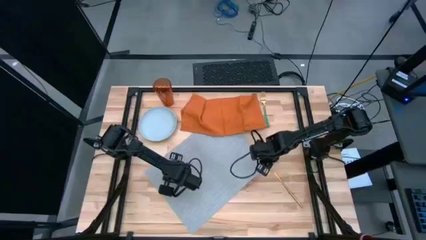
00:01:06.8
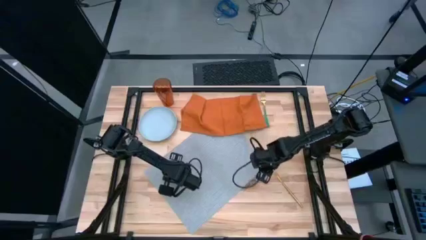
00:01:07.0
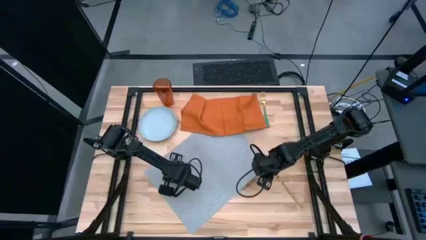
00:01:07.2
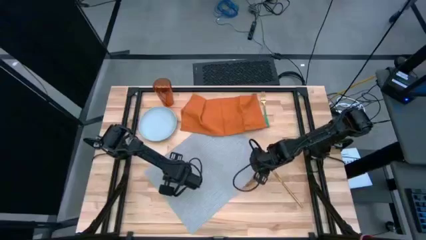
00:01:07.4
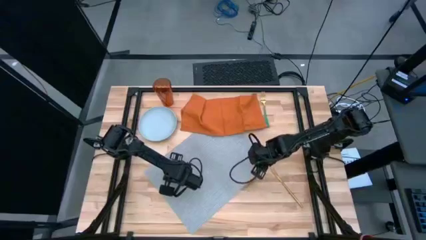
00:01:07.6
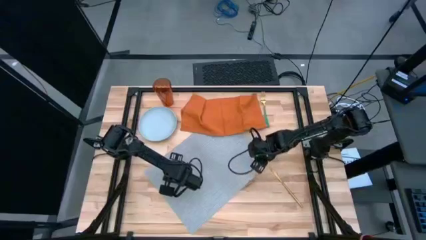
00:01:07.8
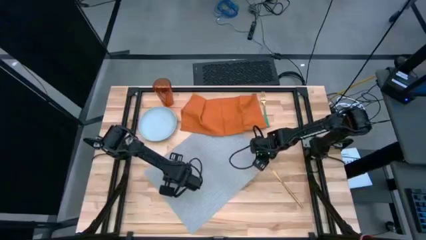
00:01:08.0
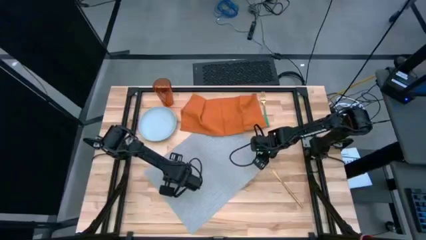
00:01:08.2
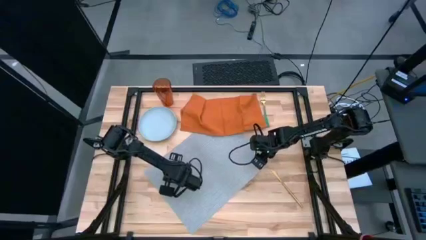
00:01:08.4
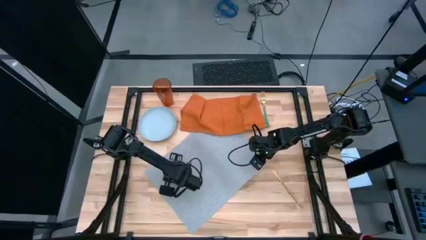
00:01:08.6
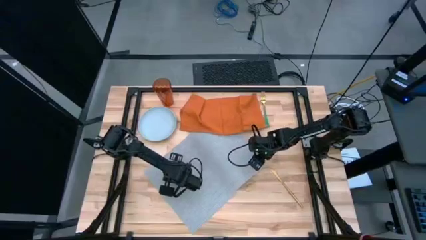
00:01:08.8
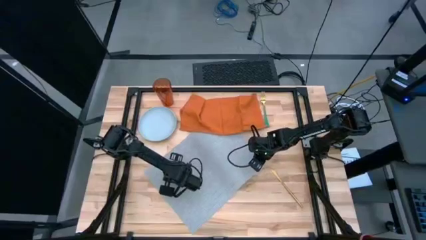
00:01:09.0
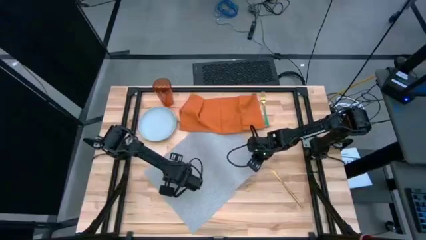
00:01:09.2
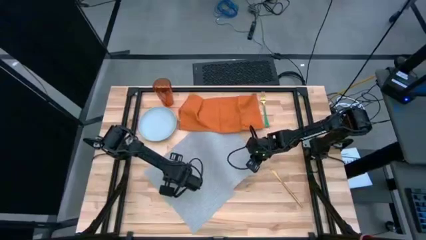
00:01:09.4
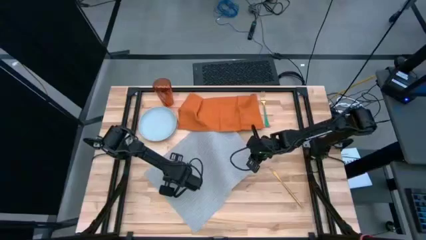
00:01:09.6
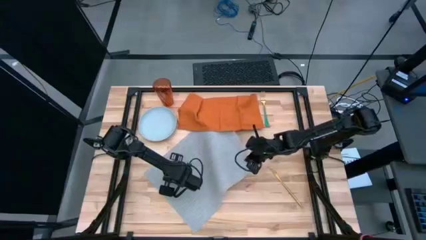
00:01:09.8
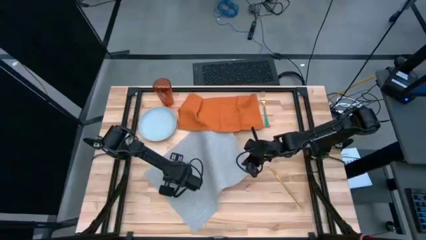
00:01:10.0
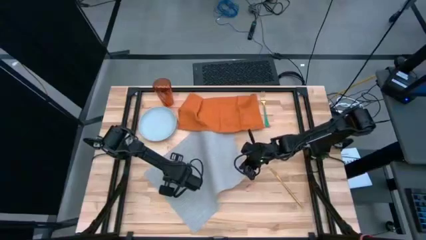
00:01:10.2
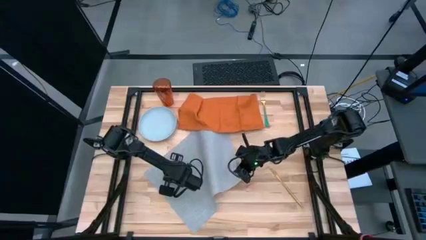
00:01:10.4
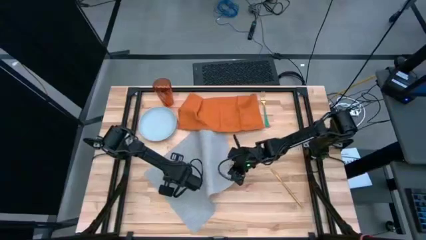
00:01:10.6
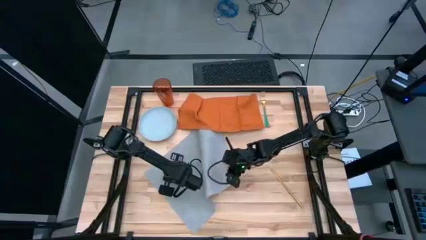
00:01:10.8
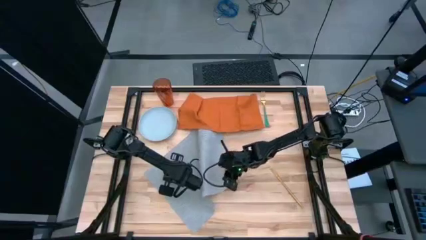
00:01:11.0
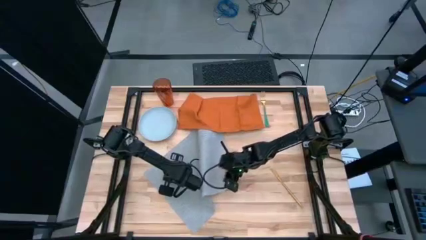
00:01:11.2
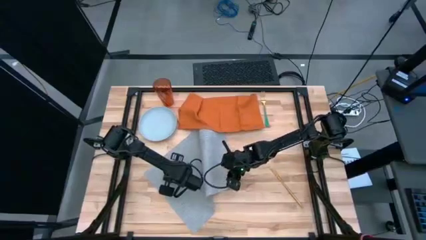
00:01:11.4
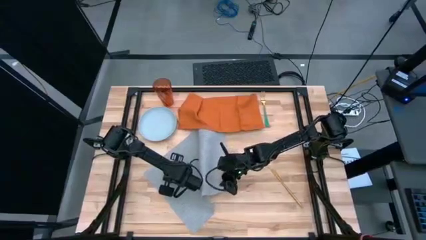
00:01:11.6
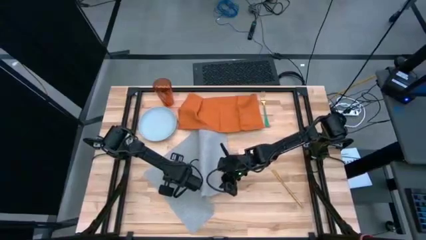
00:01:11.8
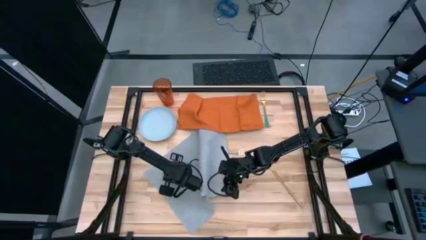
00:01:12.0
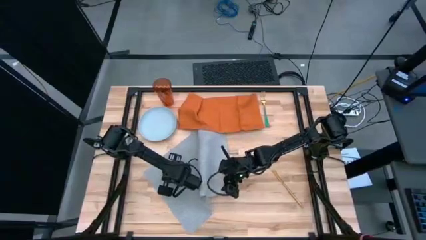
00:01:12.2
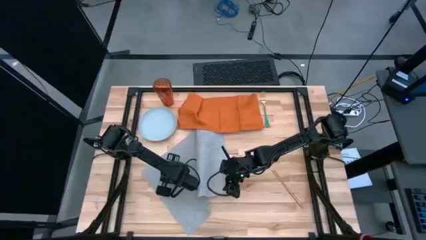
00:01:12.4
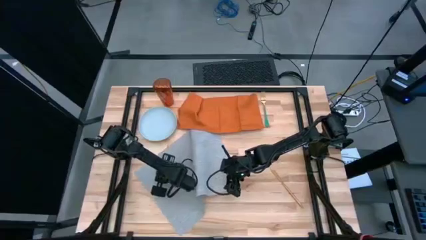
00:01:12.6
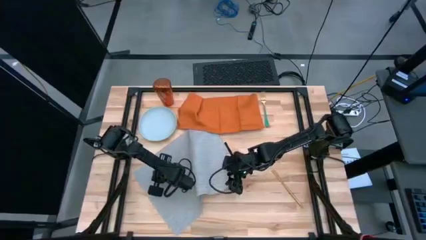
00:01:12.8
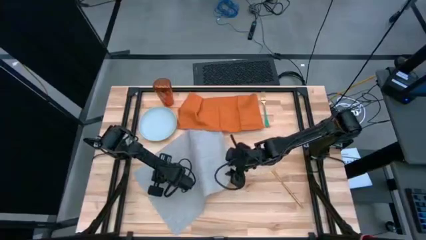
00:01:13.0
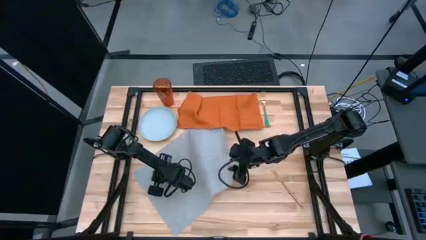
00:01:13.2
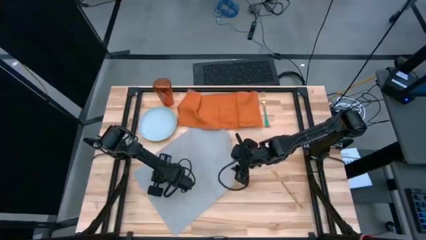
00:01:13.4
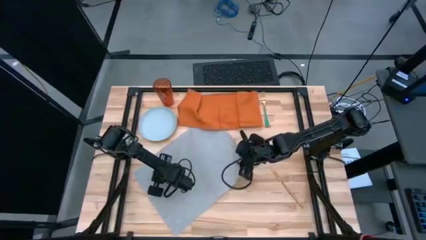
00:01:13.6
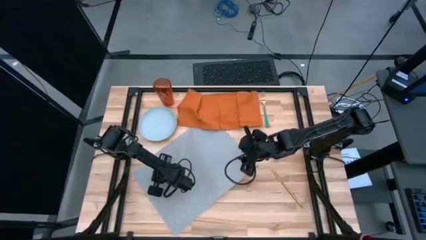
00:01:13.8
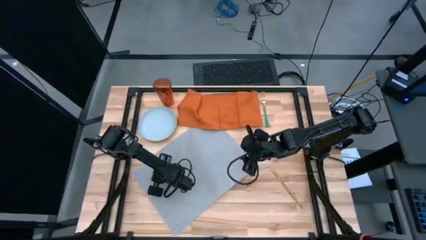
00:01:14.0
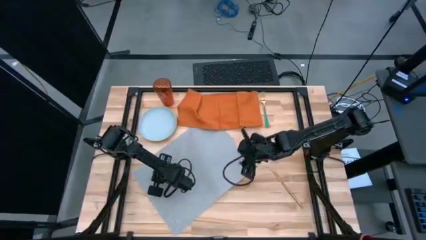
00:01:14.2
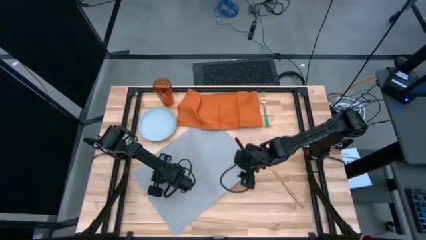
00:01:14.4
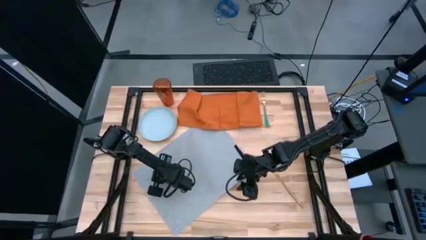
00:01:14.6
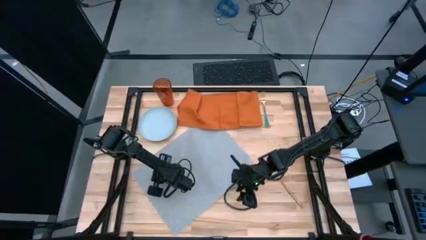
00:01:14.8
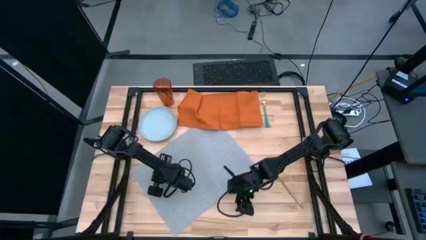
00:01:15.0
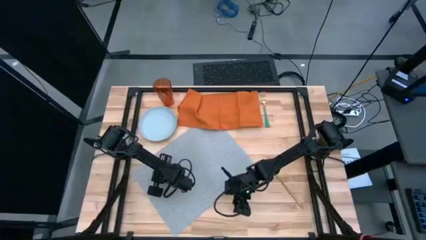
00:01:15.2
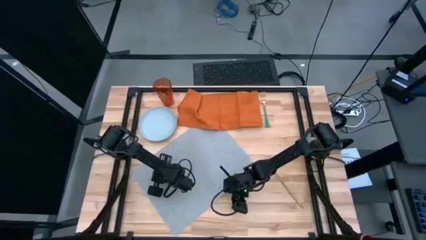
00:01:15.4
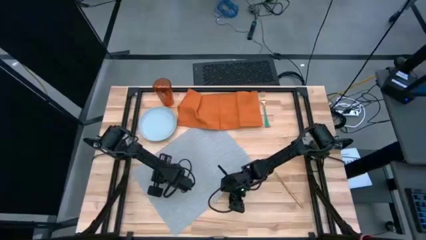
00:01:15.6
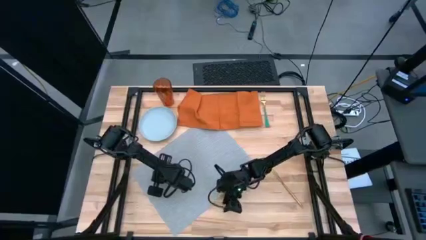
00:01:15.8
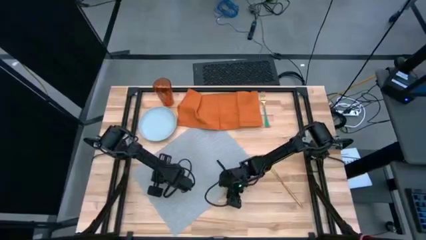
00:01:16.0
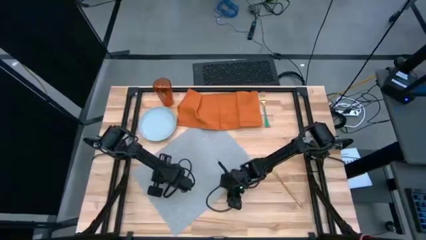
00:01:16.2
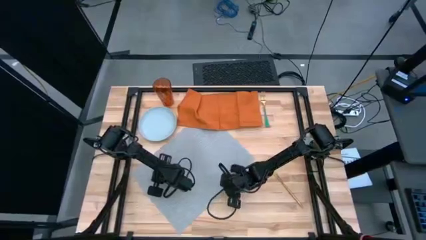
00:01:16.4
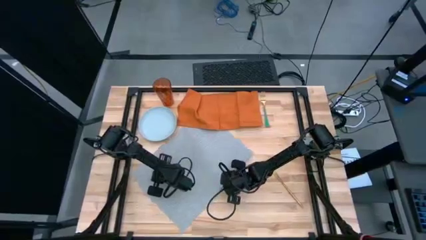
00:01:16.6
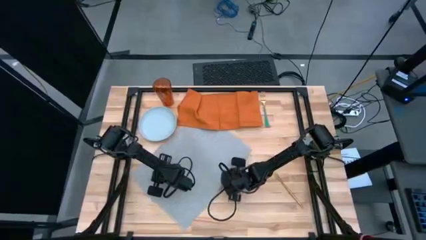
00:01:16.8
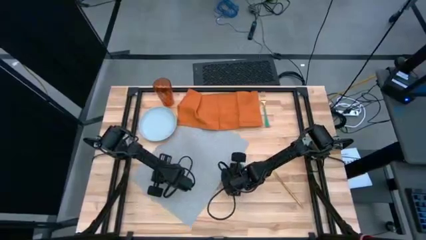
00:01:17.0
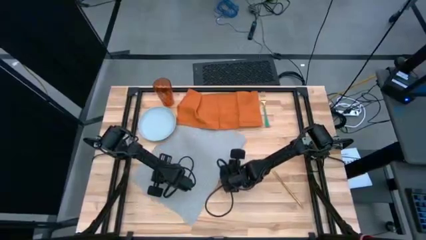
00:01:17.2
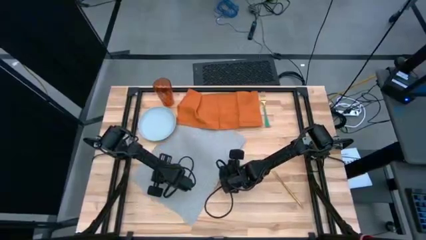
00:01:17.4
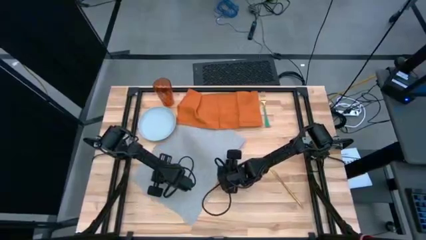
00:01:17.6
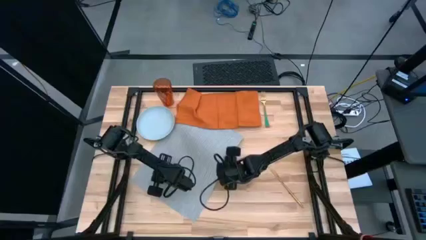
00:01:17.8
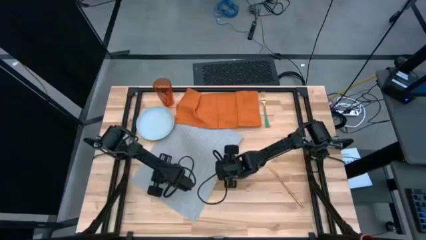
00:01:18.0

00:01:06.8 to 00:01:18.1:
Task: Set table place
Move the grey placemat

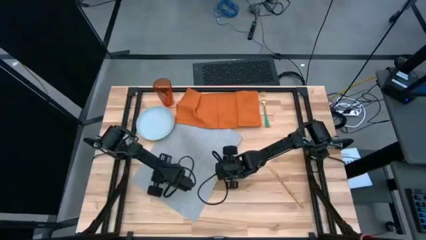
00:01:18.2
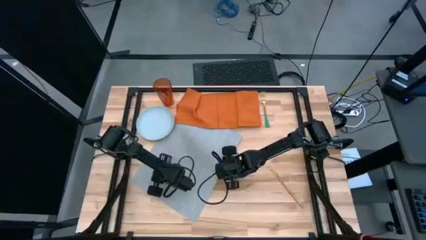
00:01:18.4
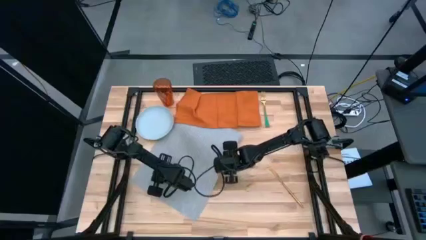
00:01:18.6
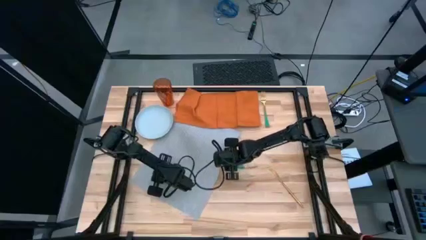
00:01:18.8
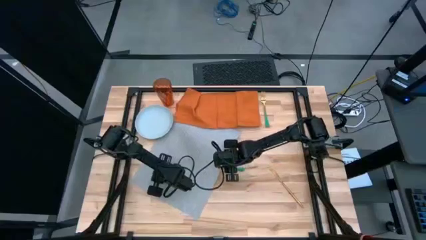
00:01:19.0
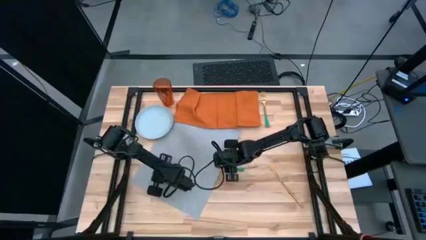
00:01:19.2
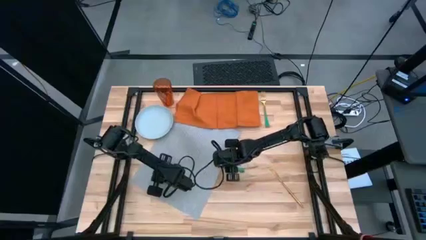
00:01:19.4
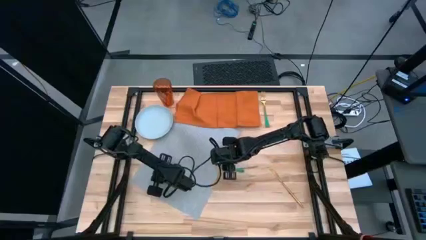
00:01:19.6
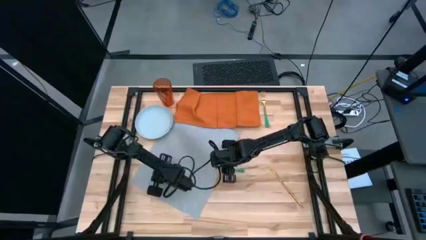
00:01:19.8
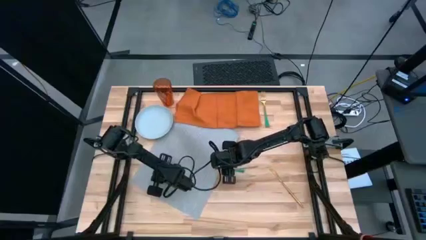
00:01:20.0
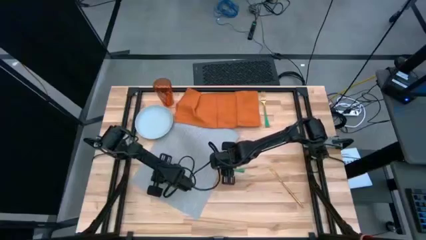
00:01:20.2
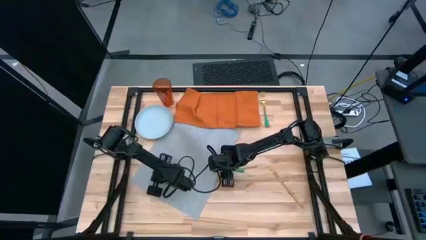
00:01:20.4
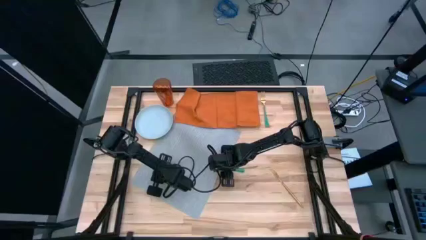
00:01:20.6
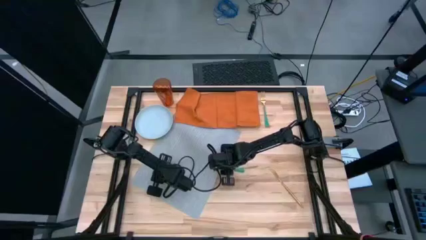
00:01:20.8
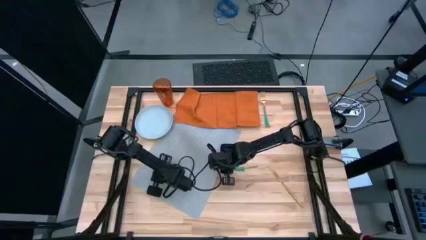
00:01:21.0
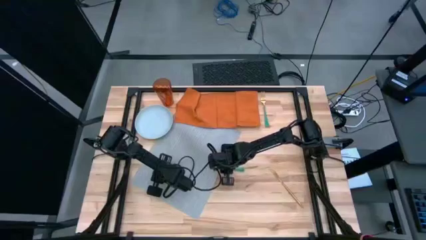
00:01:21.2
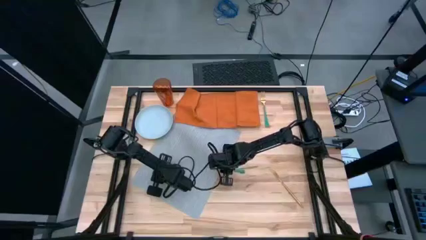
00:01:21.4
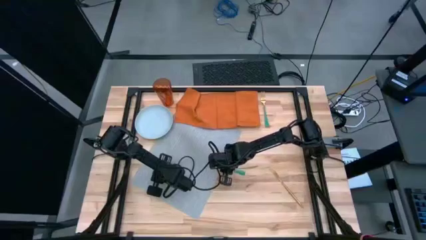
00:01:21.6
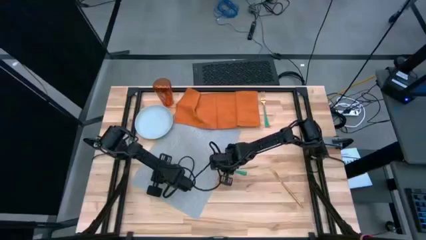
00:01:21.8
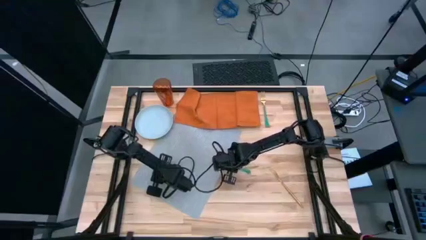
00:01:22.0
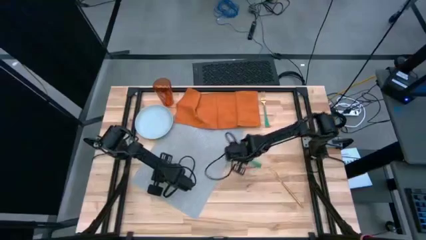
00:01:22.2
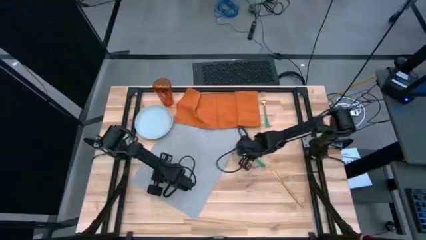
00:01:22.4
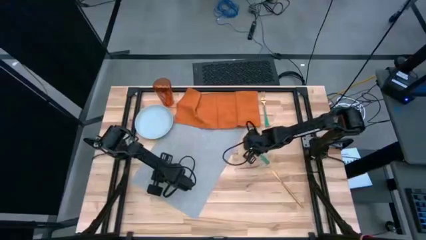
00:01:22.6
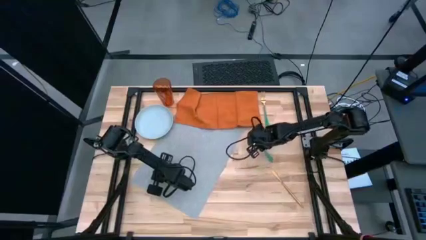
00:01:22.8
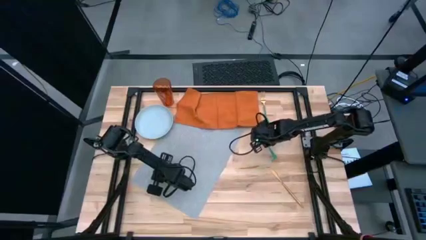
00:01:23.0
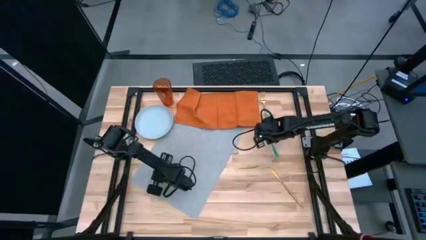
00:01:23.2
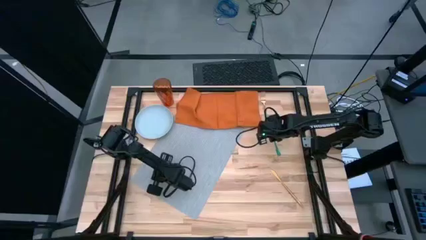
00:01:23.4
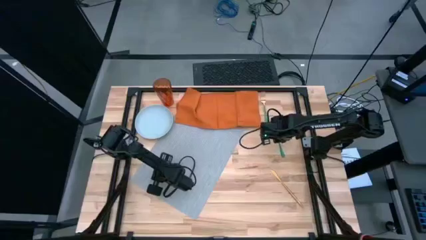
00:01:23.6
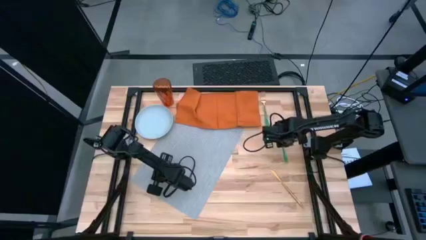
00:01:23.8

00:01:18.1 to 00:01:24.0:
Move the green spoon

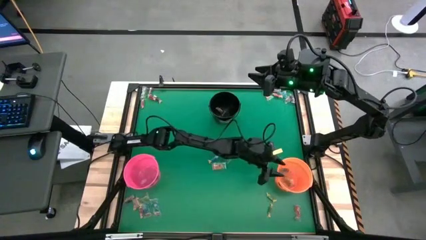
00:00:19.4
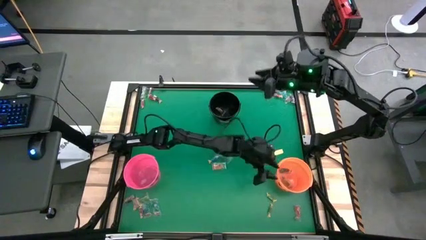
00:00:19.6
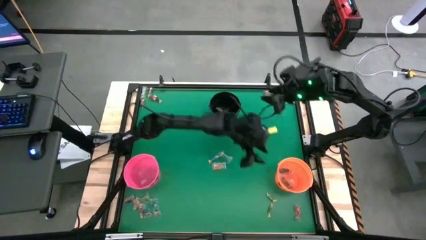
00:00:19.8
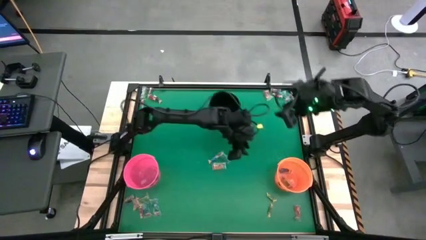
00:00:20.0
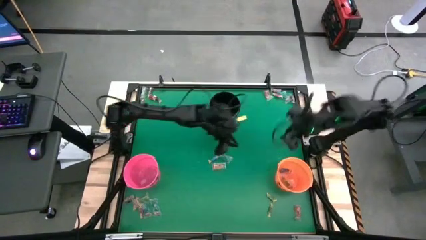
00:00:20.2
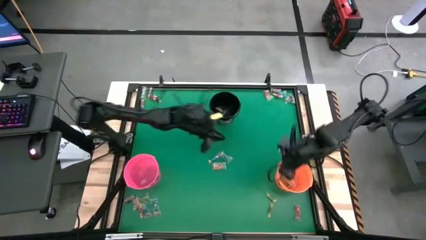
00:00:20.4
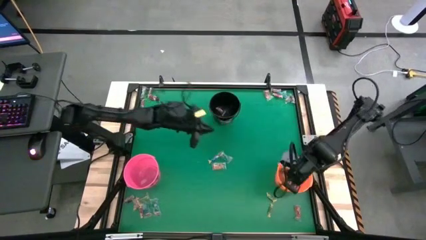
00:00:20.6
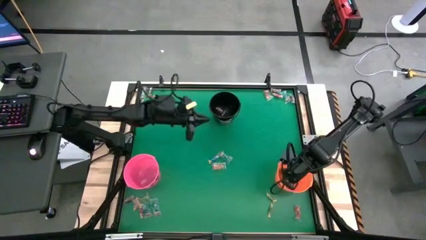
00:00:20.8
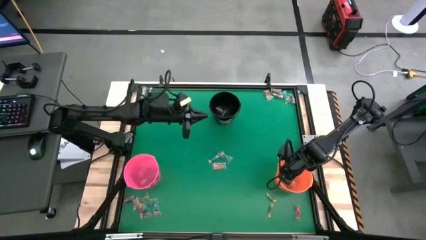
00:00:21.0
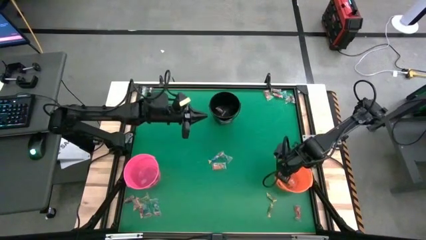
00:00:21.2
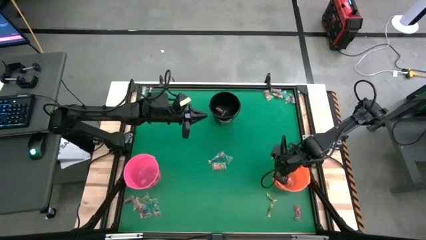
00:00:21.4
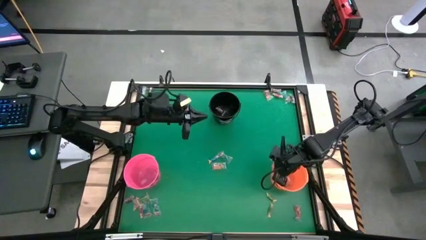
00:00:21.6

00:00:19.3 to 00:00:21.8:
Task: Sort candy by brand, put in halloween buckets
Adjust the orange bin
